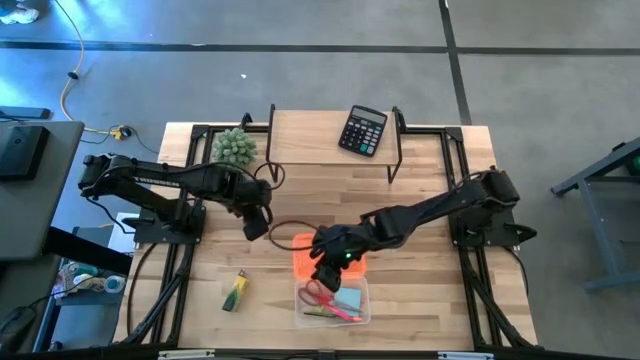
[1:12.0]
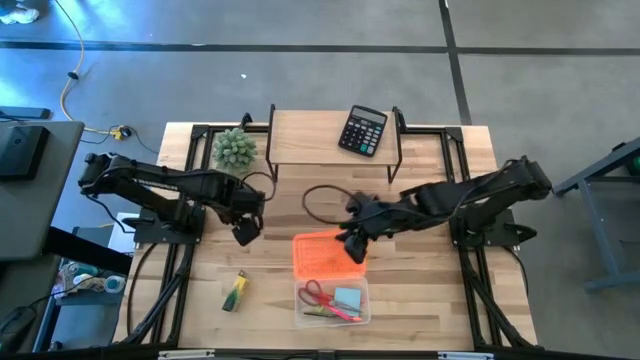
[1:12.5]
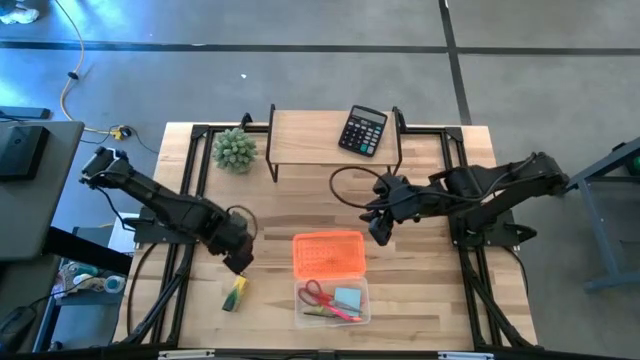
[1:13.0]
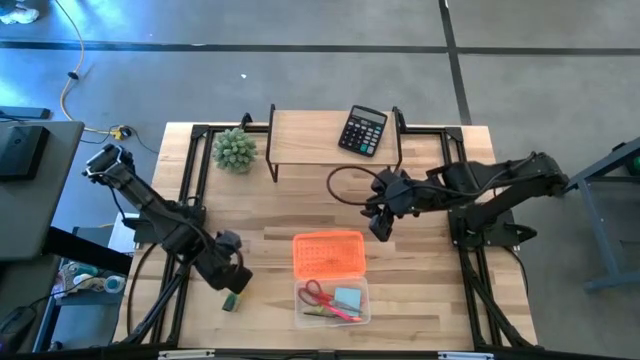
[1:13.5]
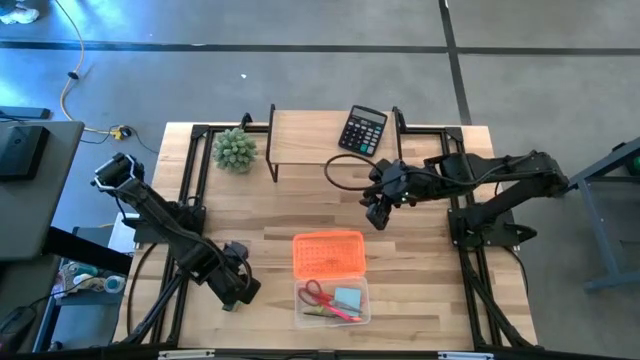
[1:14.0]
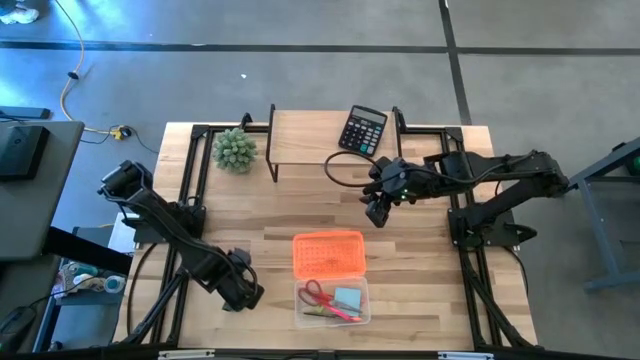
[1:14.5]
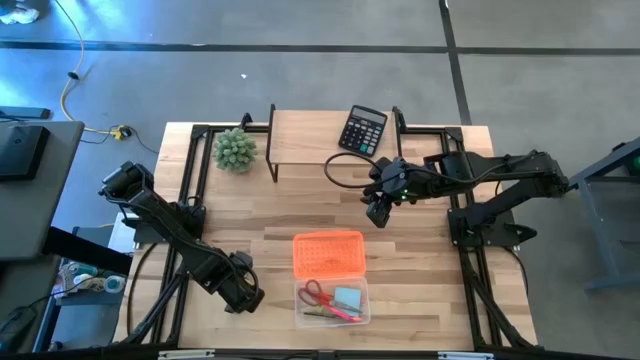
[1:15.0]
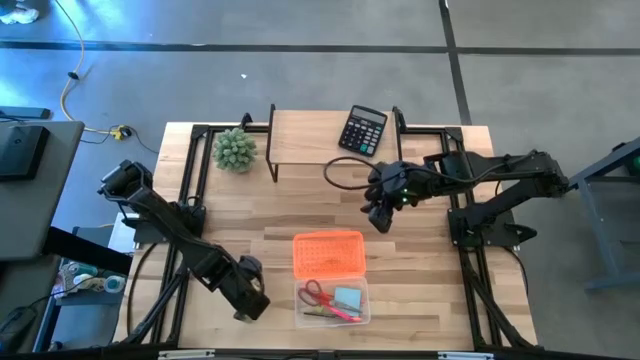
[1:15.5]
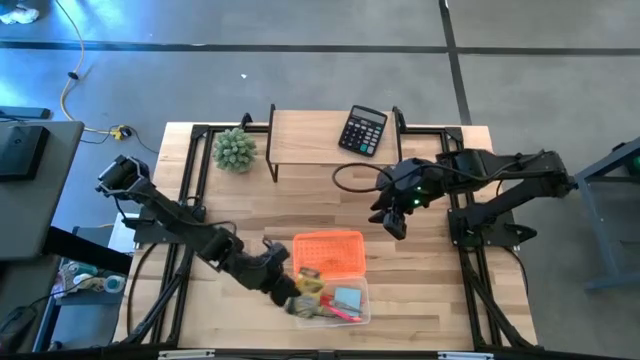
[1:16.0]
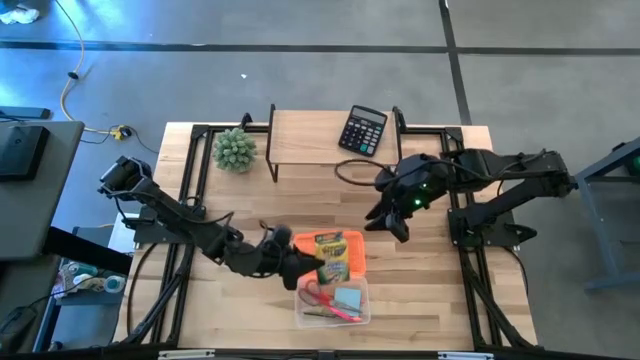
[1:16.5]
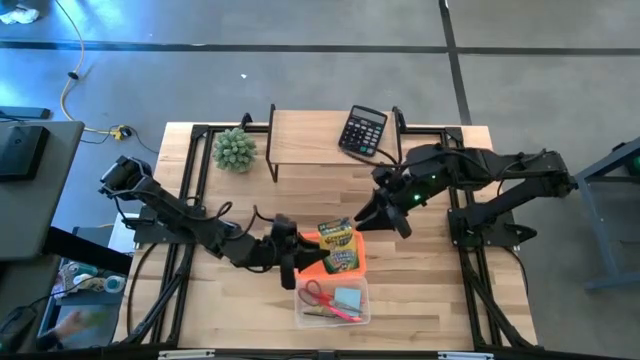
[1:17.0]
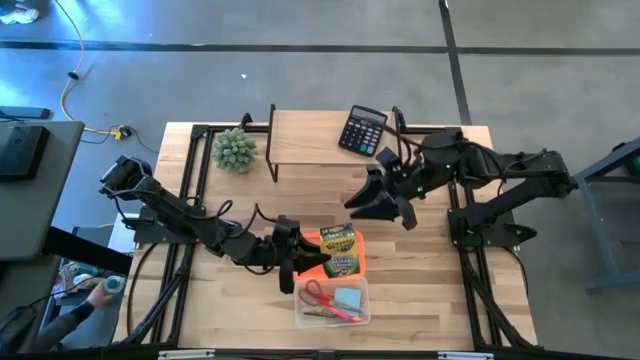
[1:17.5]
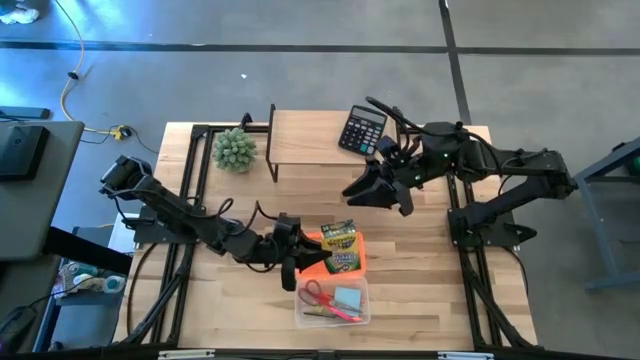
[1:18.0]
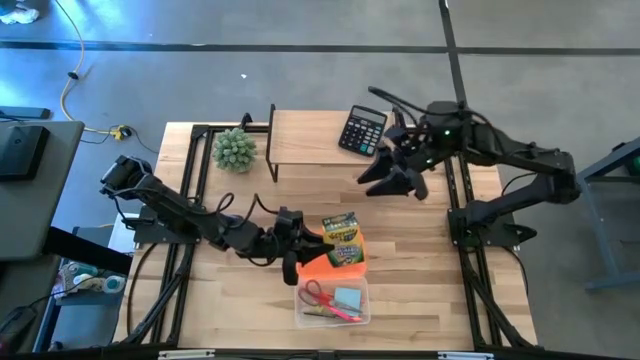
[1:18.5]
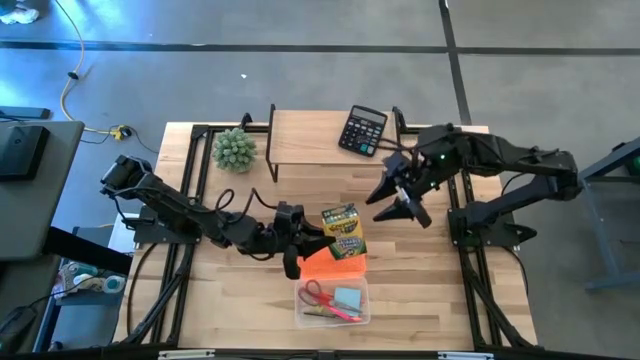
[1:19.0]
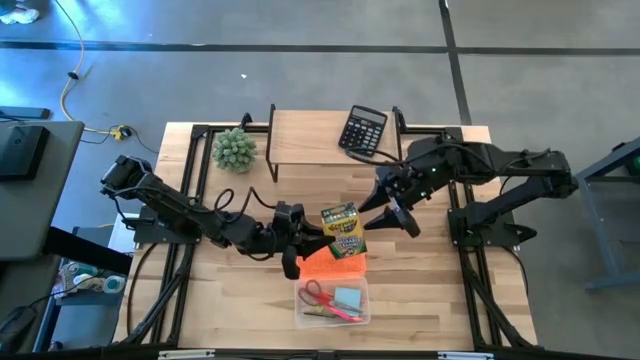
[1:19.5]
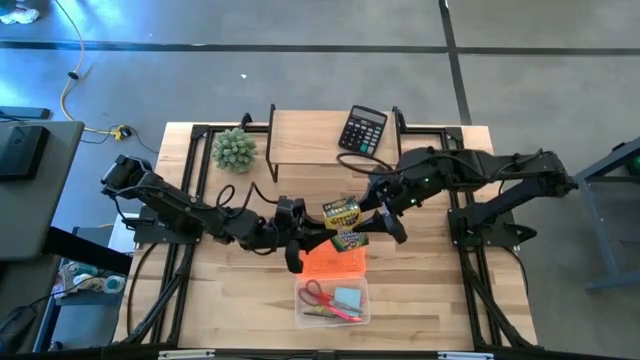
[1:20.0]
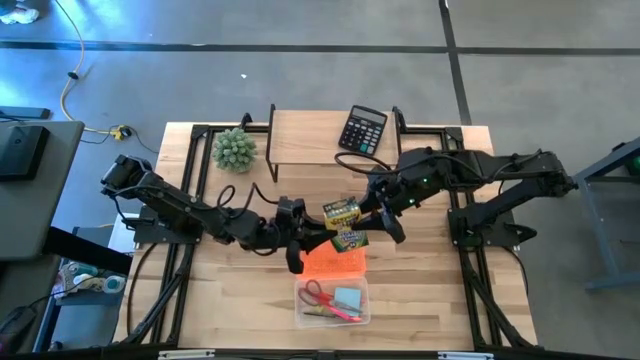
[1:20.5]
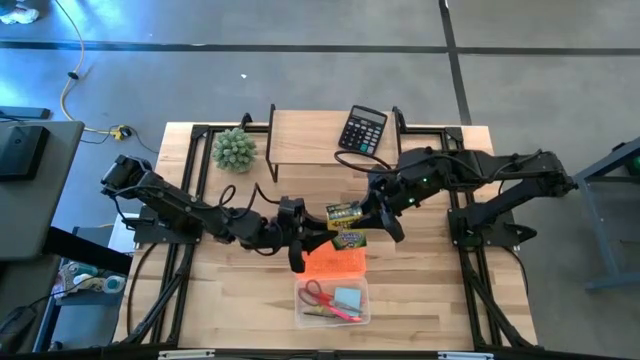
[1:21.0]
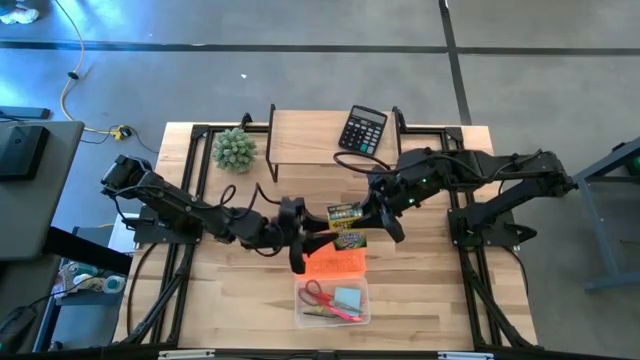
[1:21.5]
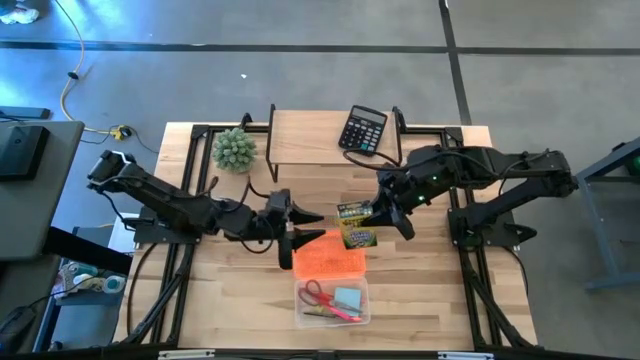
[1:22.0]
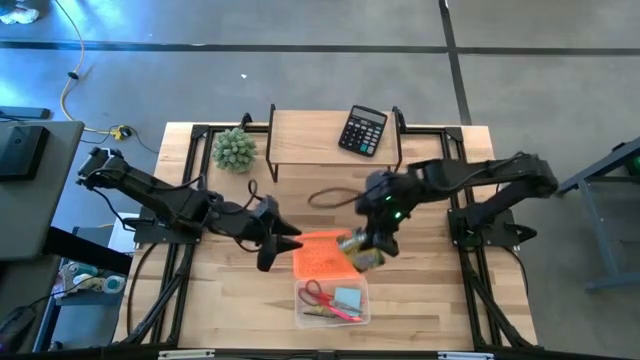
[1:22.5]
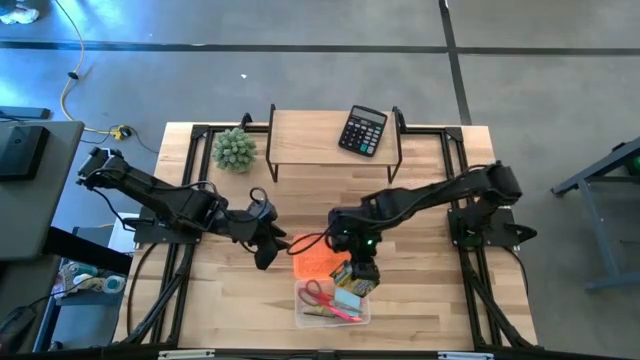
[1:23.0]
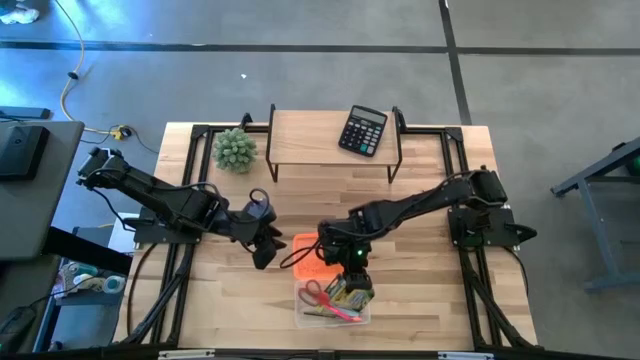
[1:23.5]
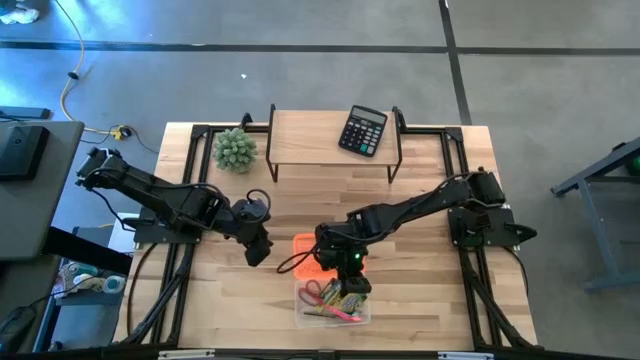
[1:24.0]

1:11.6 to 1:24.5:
Task: Pack school essentials
Put the crayon box into the orange supply box

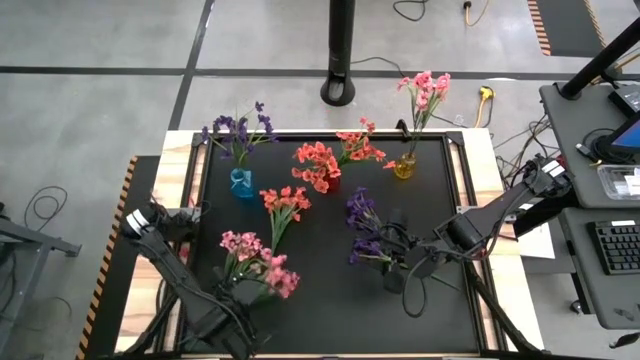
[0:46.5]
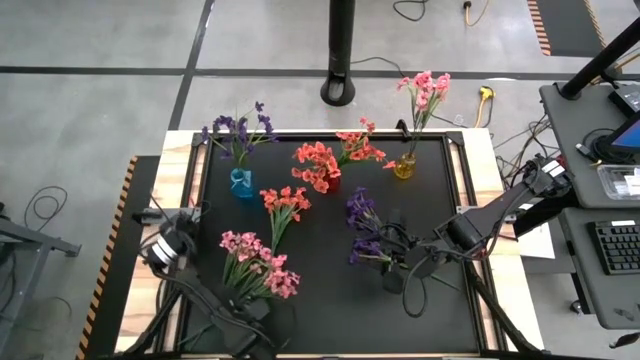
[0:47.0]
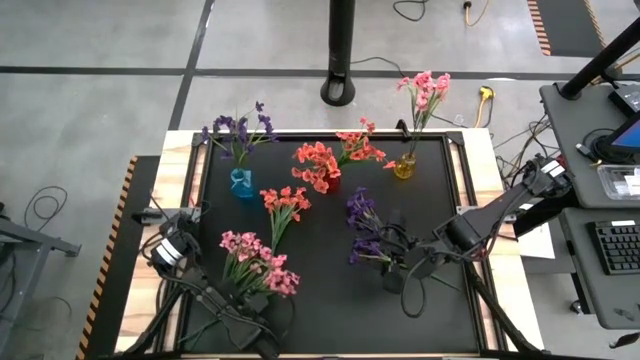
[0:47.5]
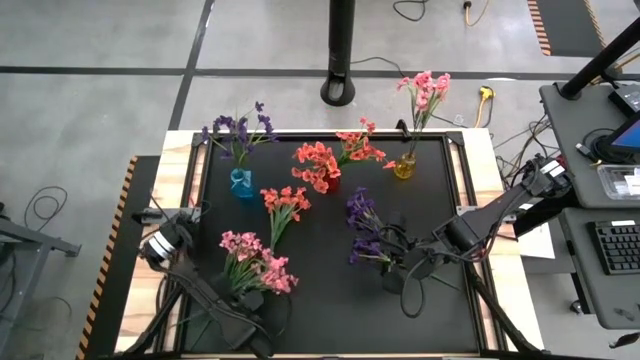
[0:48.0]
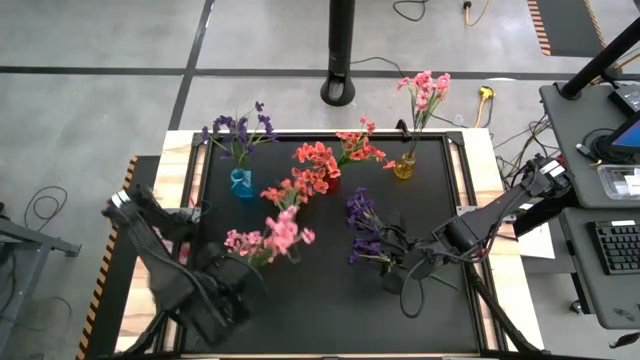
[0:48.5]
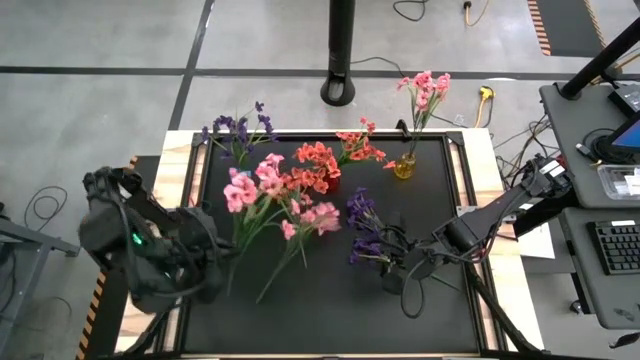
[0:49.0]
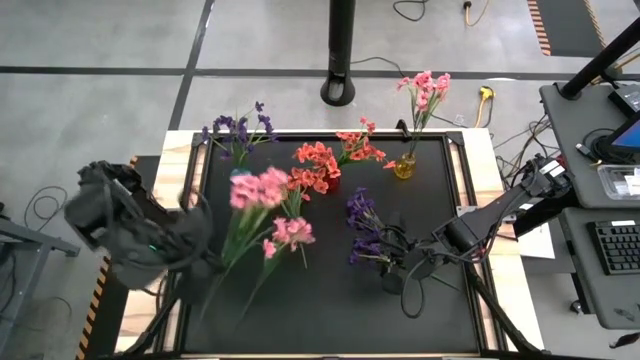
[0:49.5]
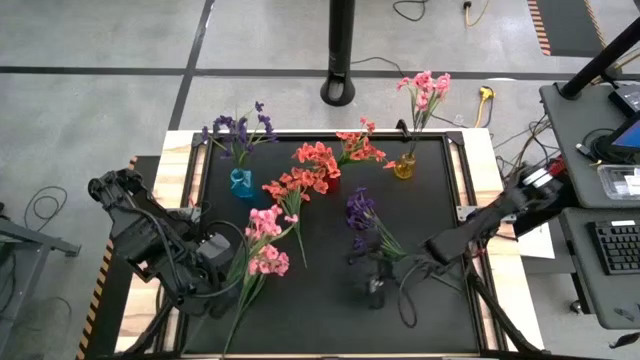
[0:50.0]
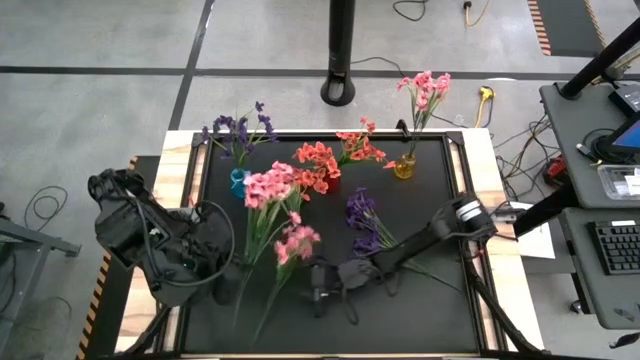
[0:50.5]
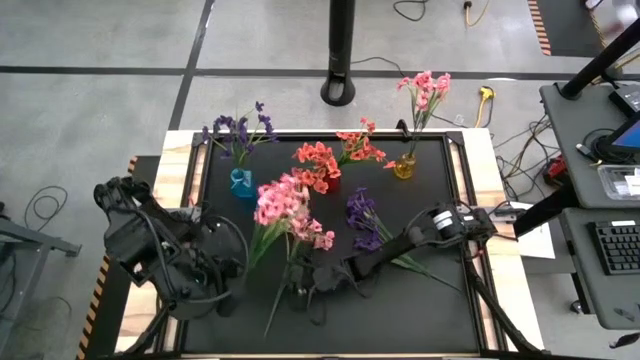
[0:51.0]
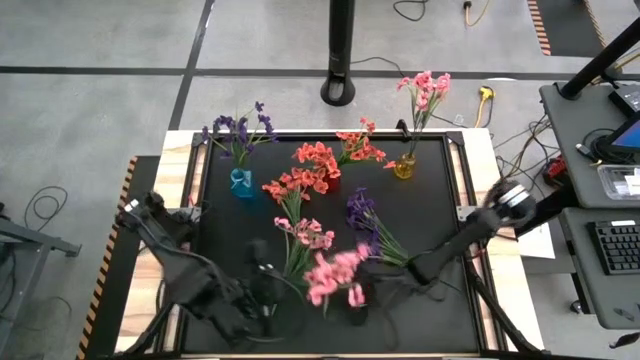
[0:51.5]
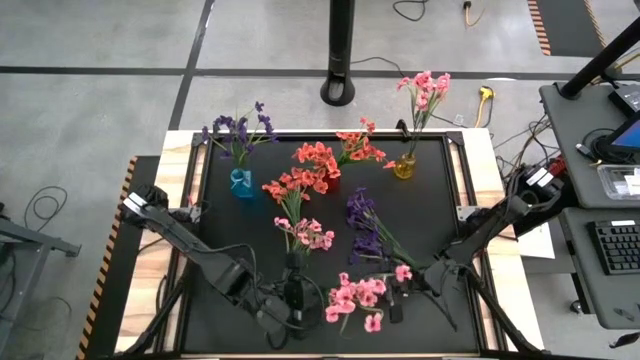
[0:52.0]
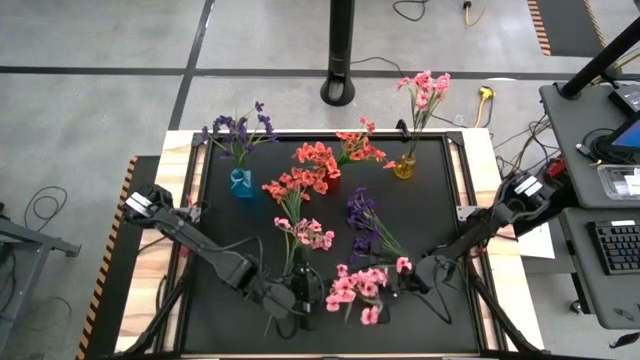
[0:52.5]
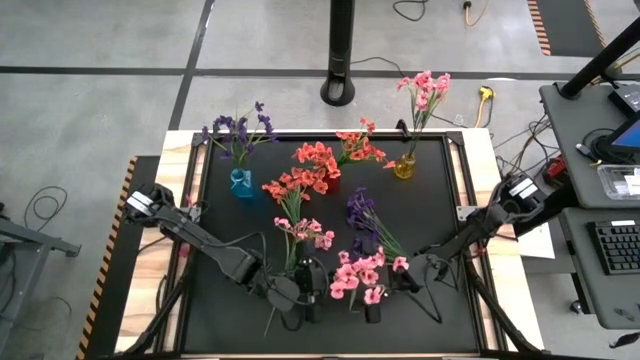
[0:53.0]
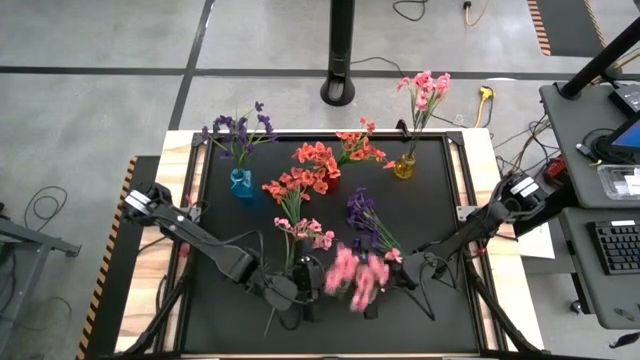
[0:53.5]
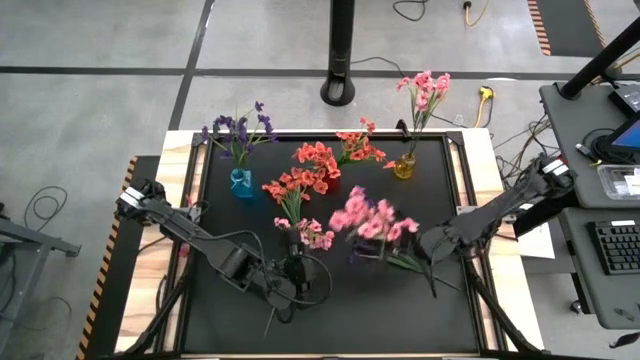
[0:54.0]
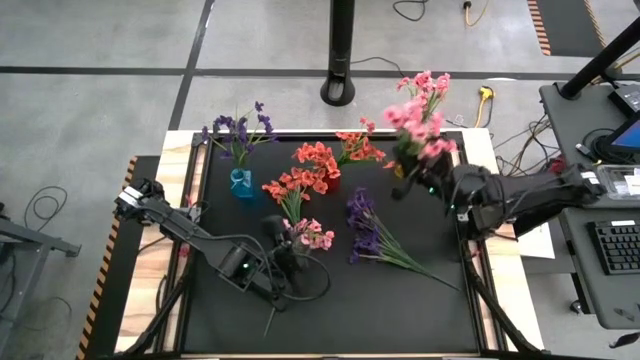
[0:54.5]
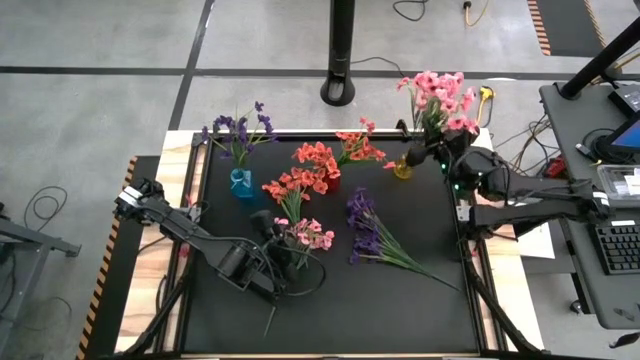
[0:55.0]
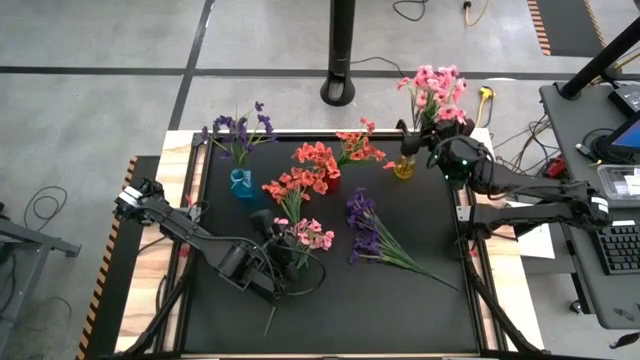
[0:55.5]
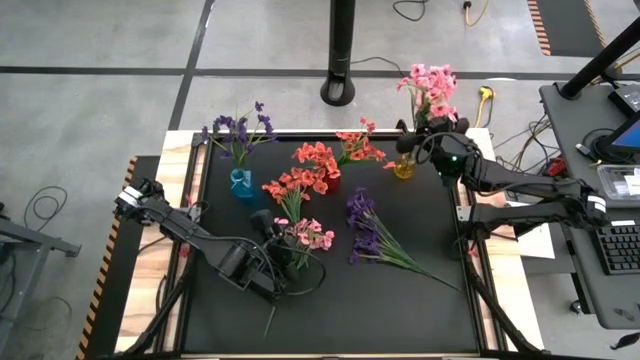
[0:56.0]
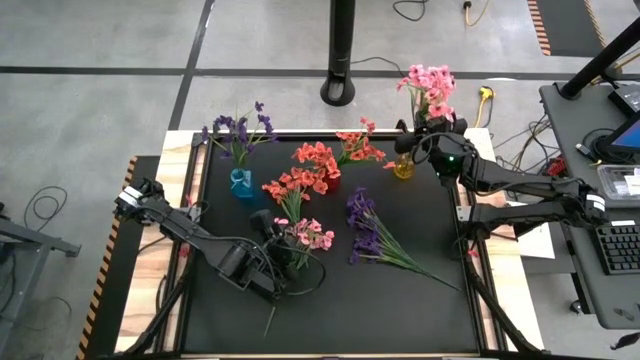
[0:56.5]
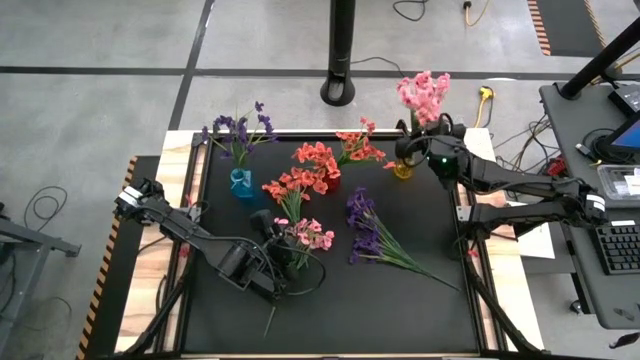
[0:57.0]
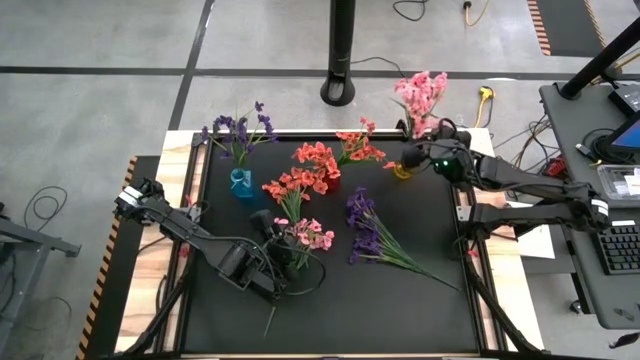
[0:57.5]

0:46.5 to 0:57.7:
Task: Sort flowers into vase by color
Put the right pink flowers into the yellow vase
